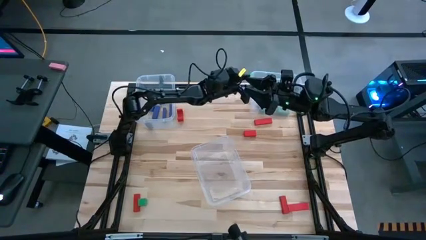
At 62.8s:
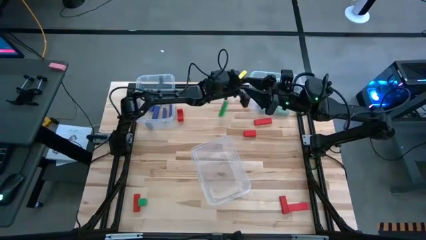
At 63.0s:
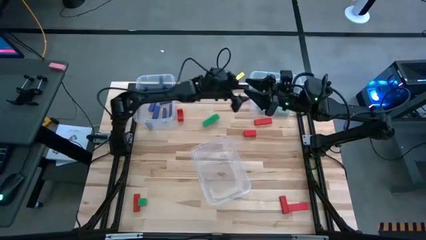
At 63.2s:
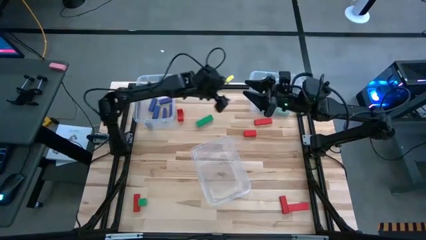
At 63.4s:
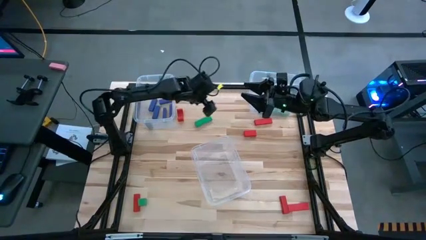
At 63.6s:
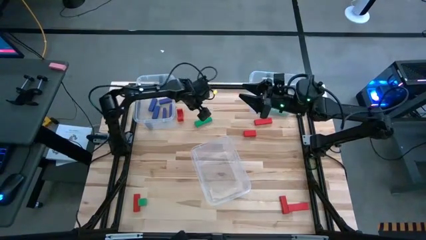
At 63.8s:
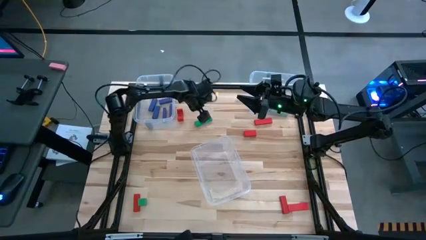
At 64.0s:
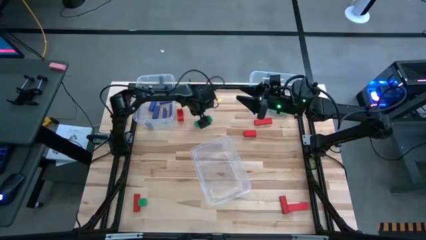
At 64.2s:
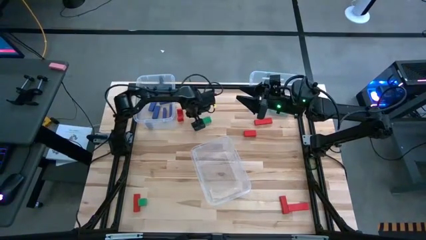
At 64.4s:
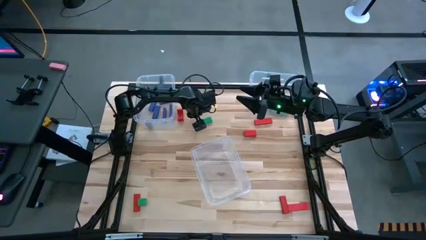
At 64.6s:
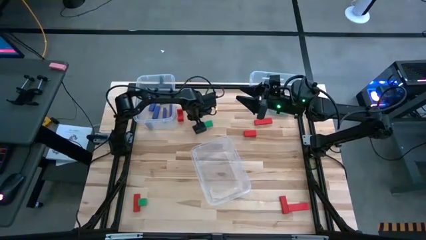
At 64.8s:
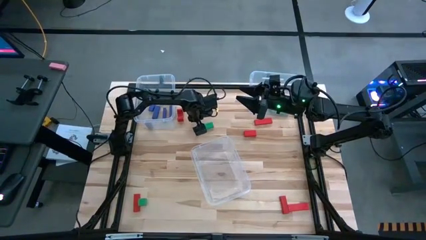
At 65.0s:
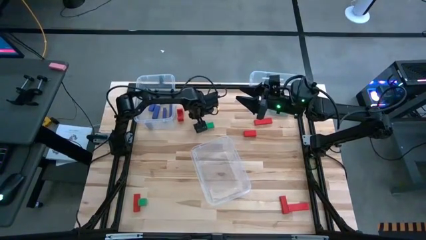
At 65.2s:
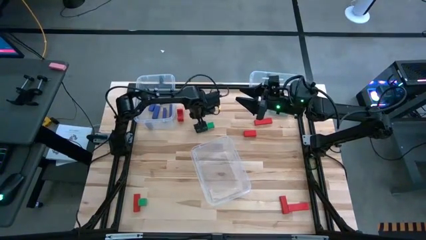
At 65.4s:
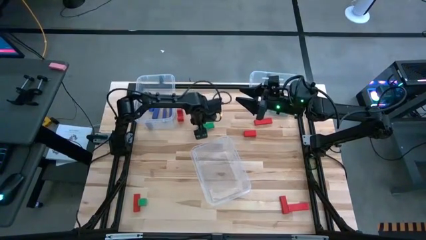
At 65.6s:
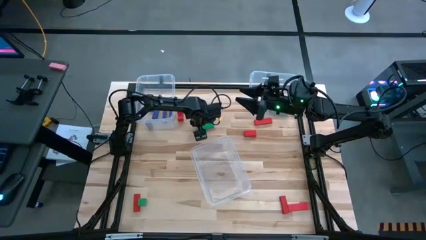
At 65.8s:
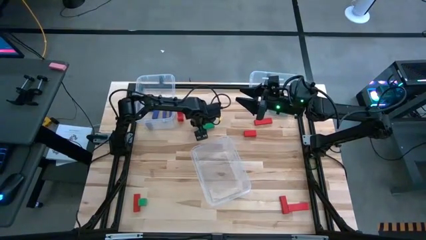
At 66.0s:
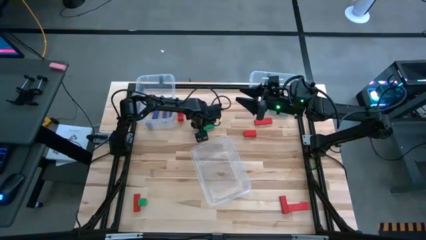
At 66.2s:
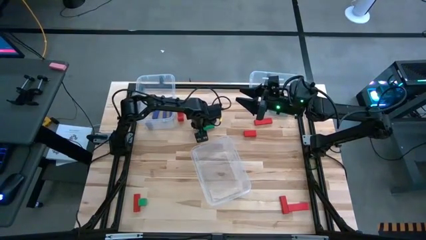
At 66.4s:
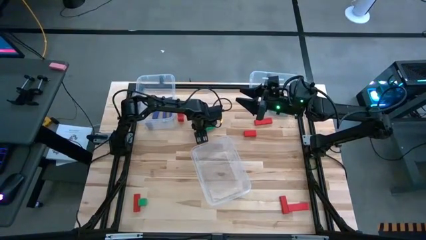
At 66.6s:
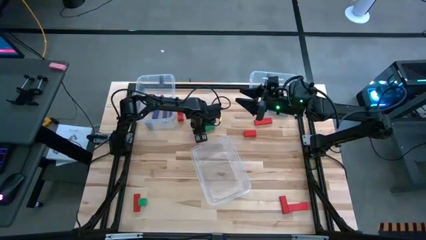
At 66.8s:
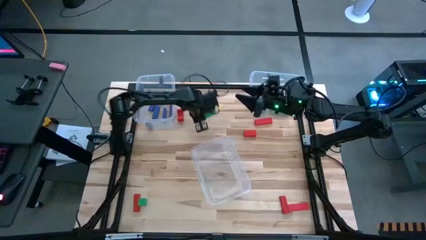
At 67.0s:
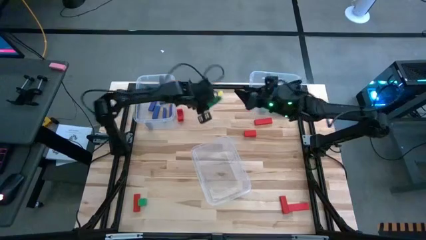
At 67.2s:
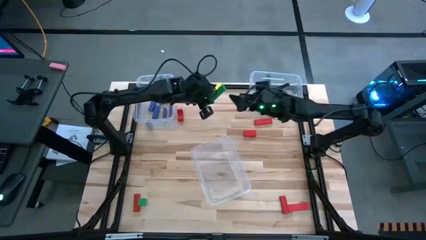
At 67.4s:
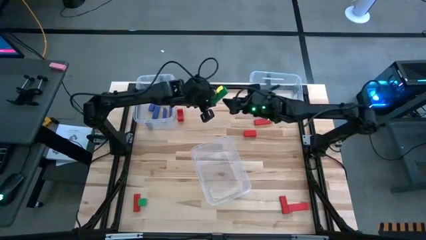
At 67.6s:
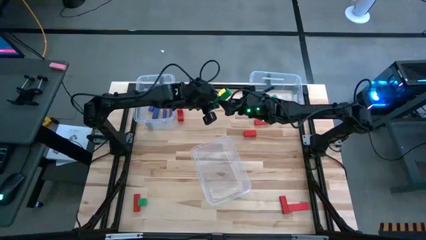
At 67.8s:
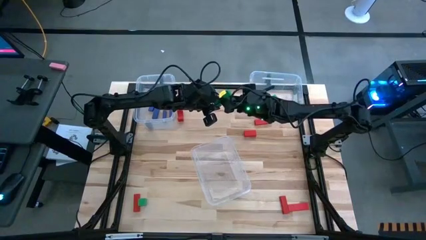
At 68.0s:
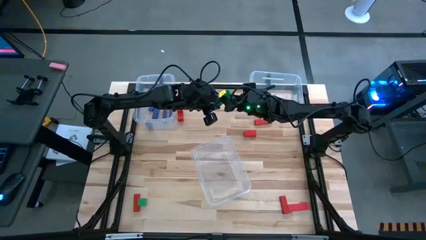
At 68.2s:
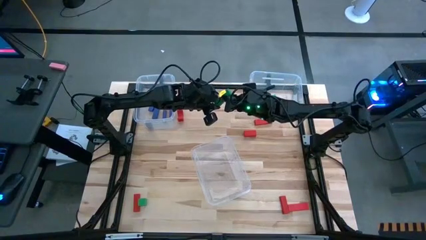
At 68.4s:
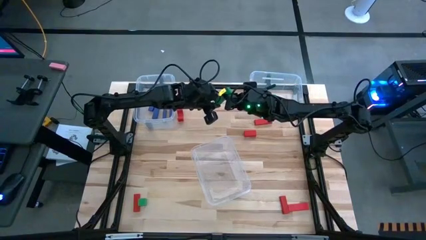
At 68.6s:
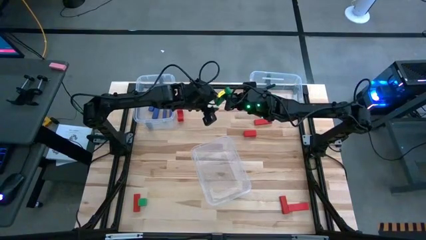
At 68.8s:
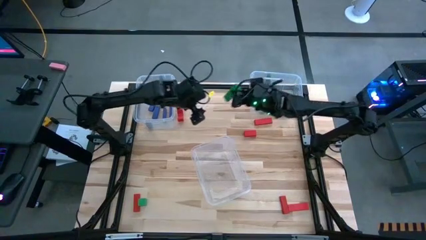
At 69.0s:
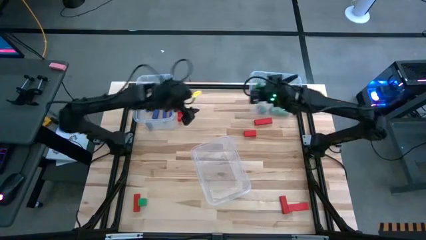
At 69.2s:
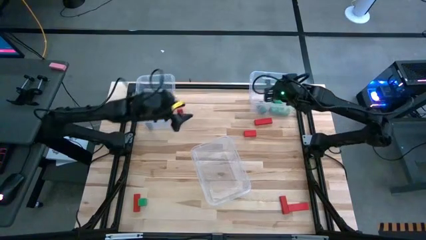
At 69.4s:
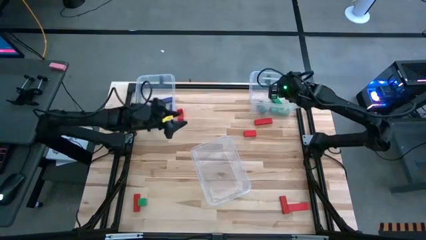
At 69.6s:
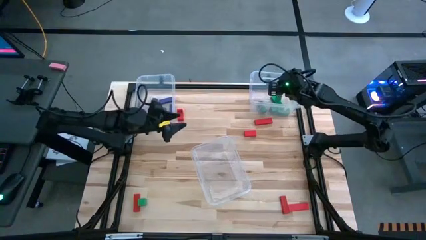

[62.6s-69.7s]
Task: Sort blocks
Put the green block into the top right transparent bin

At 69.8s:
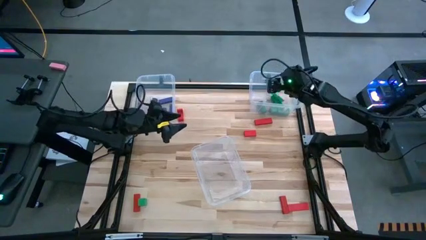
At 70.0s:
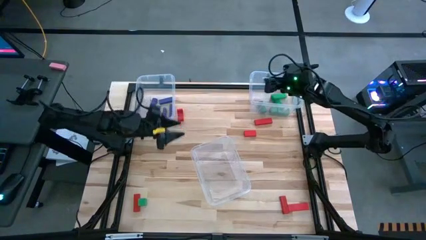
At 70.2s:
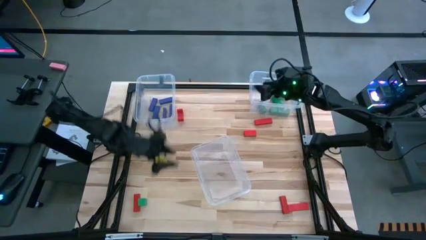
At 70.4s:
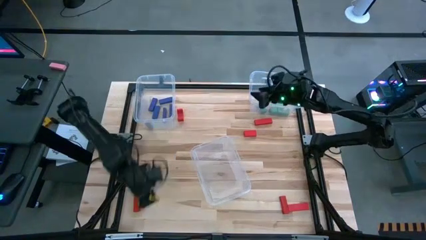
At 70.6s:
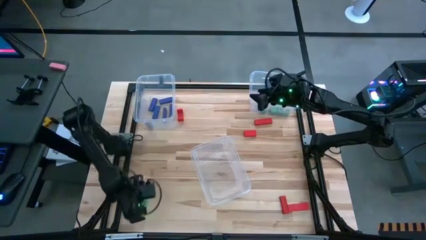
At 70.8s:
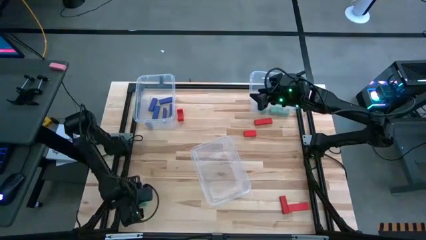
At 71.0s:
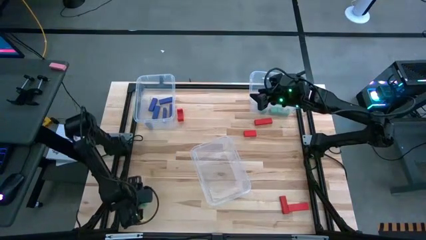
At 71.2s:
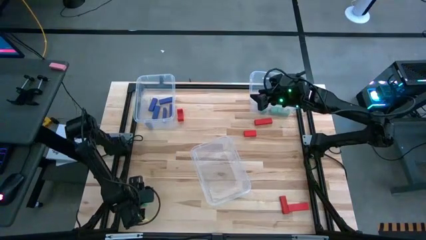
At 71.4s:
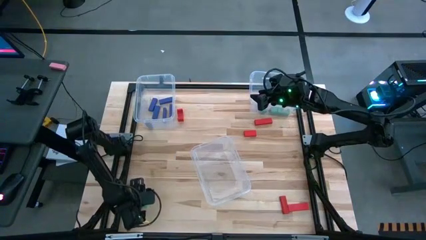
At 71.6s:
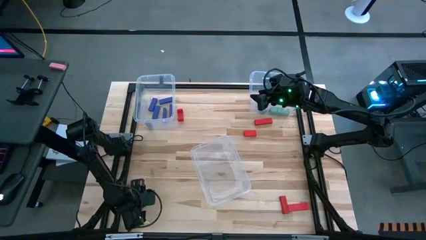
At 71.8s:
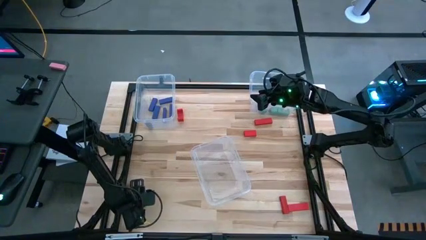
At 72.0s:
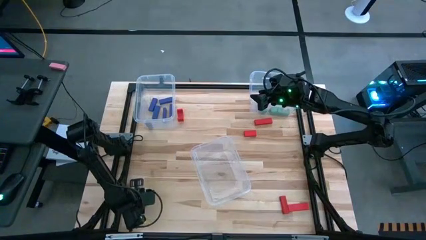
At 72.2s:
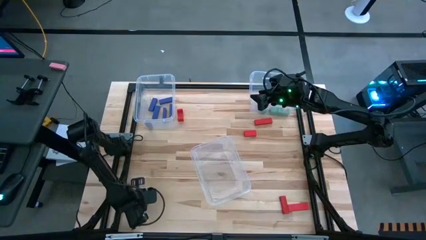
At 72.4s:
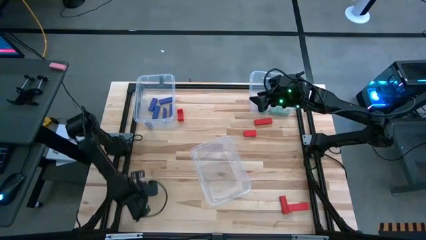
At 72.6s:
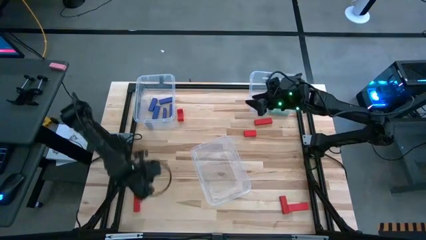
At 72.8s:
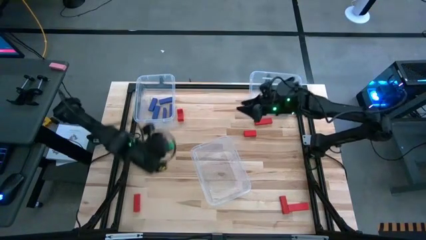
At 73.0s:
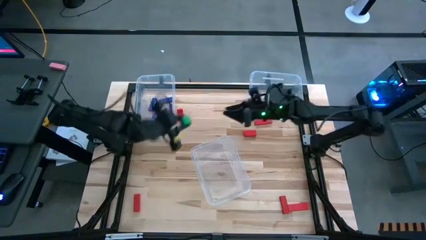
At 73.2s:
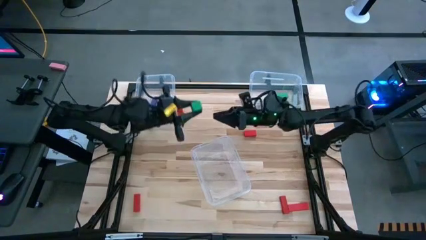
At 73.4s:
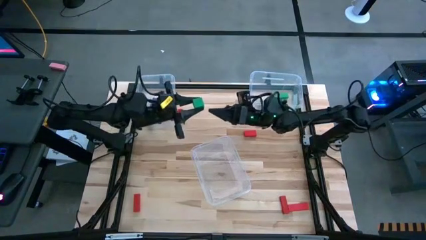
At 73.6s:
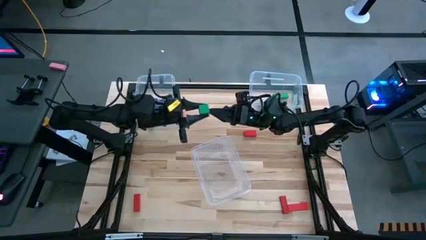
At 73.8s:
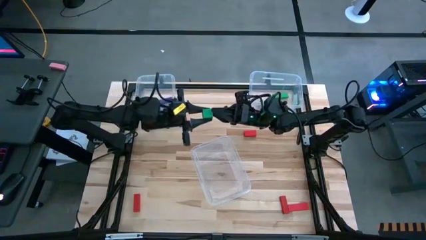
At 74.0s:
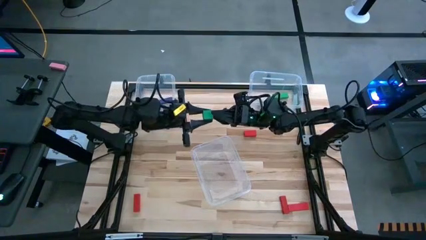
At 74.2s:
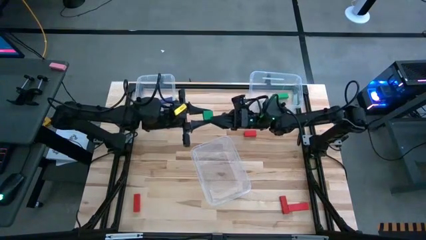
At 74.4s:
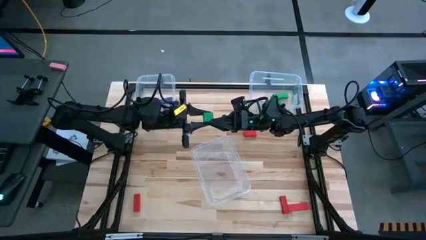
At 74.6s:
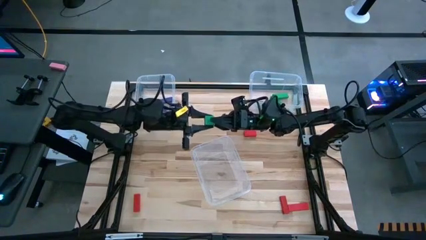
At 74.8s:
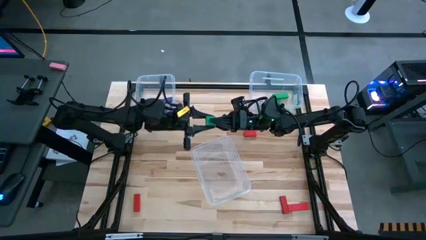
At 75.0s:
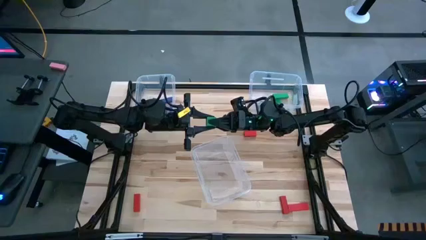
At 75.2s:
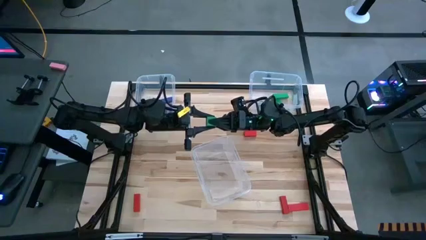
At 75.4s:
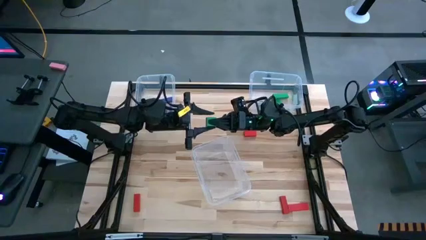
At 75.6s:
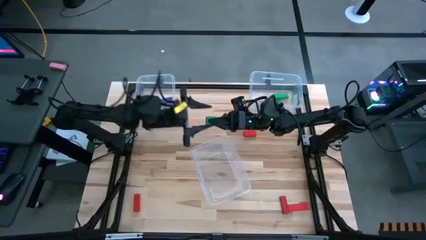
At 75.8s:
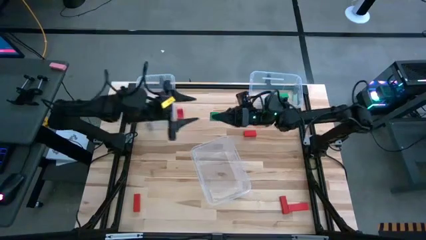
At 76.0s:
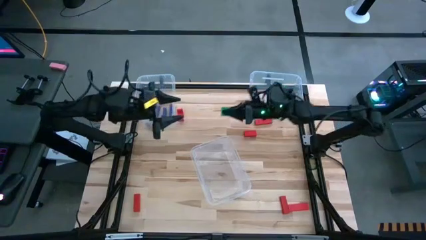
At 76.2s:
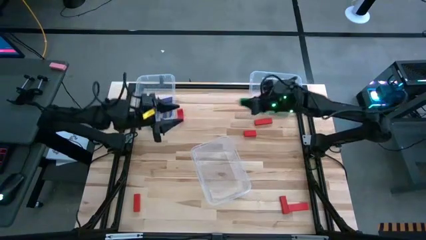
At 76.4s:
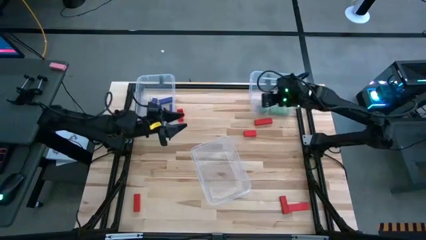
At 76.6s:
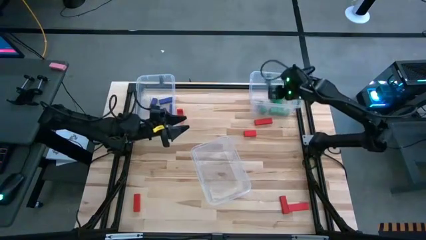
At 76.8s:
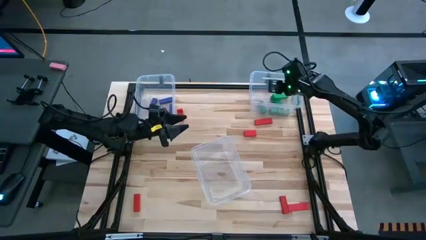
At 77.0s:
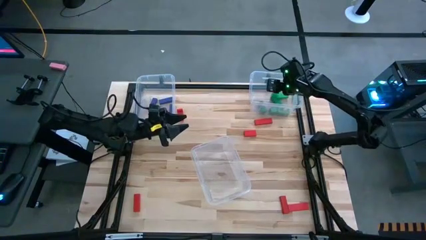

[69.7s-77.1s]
Put the green block into the top right transparent bin

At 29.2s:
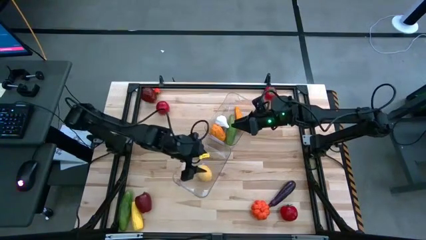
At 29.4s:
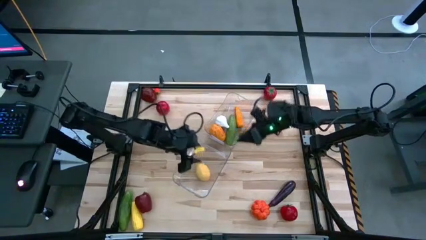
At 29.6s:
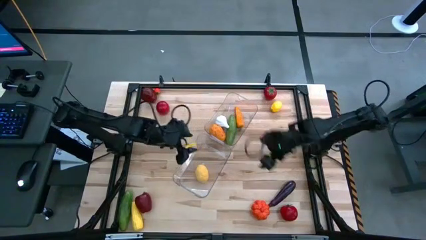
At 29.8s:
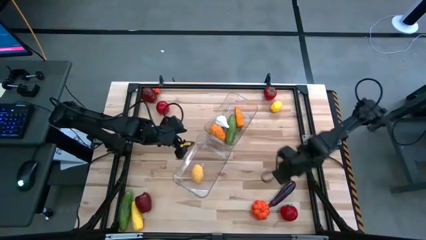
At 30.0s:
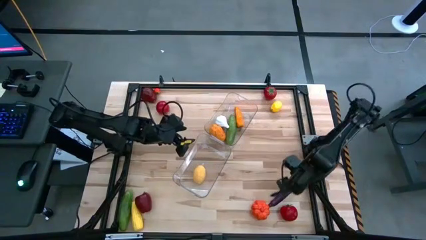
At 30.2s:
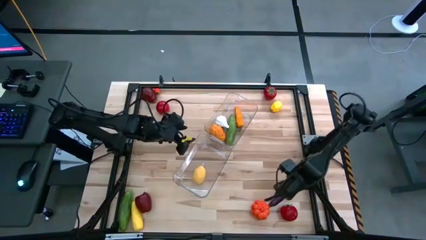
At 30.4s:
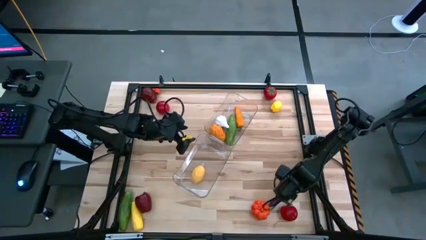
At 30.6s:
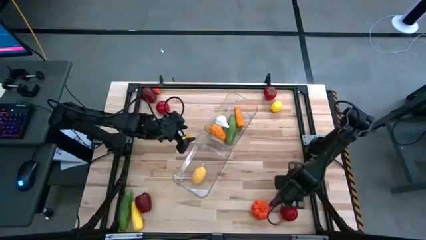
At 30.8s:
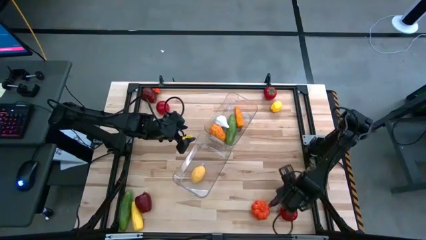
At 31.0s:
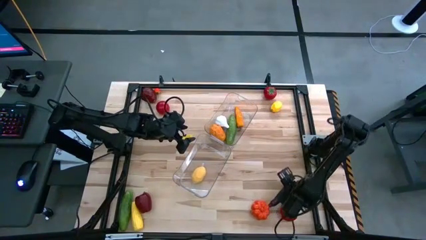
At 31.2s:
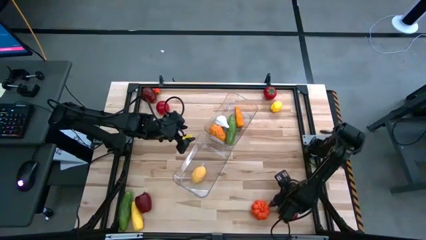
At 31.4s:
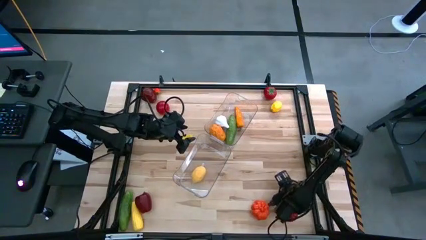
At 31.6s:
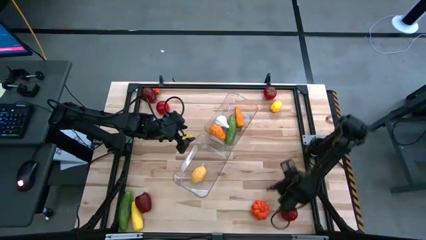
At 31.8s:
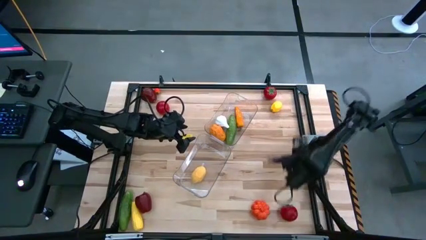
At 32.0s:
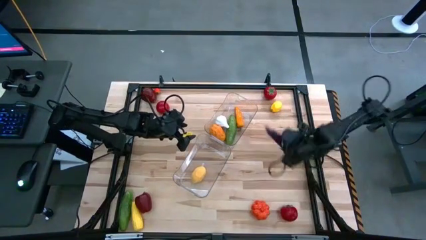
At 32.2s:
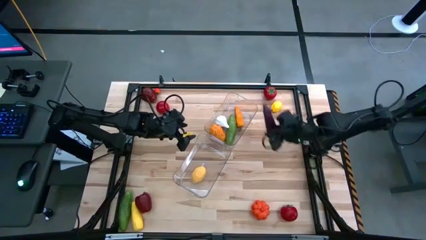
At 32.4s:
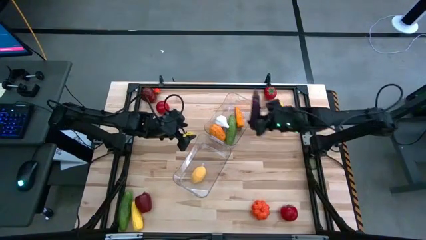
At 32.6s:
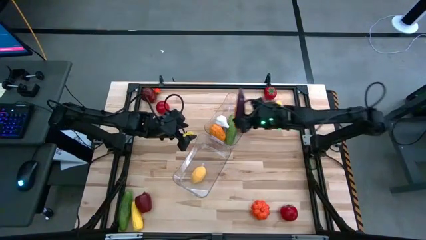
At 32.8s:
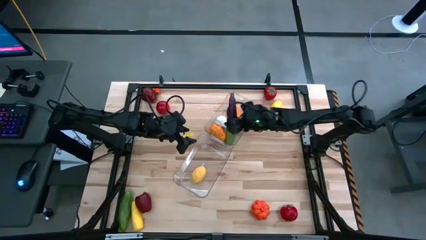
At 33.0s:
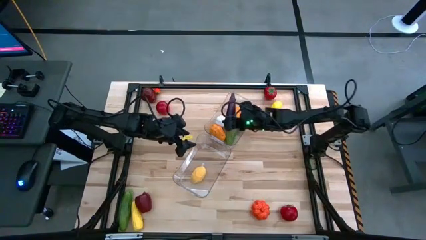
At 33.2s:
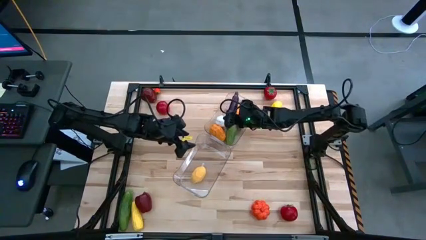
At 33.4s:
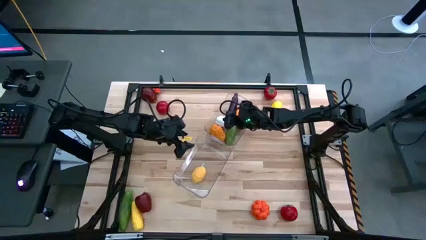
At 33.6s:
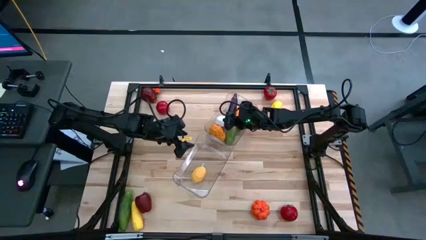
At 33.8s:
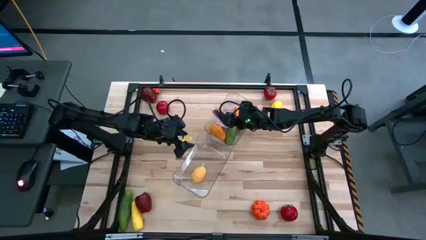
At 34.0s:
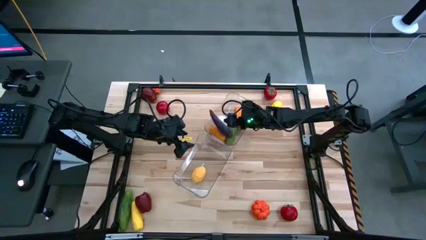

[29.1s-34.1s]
Task: Sort produce into baskets
Put the violet eggplant into the top transparent bin
